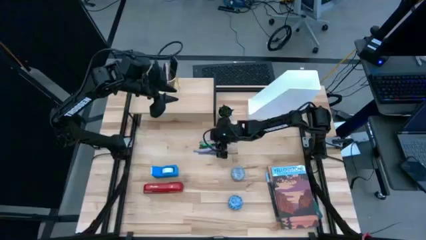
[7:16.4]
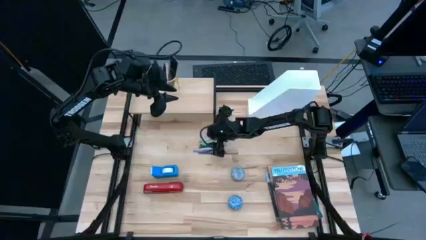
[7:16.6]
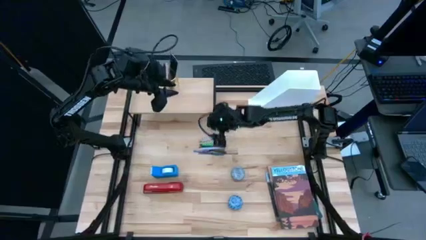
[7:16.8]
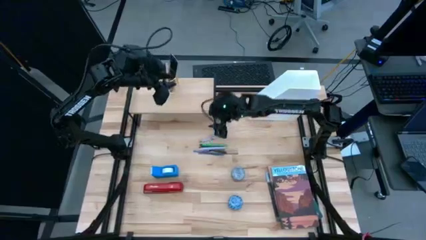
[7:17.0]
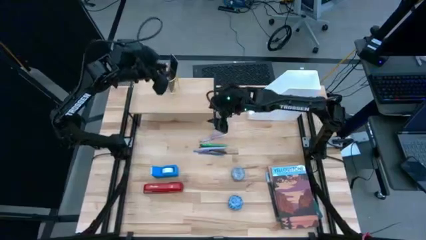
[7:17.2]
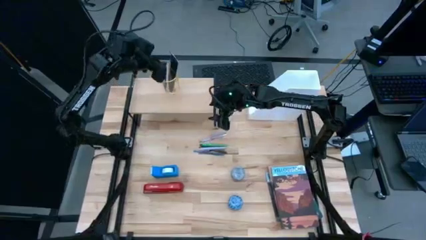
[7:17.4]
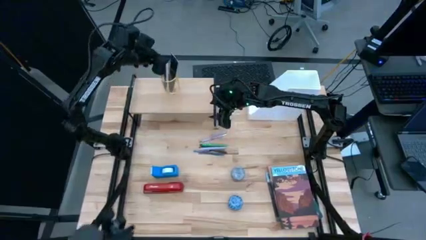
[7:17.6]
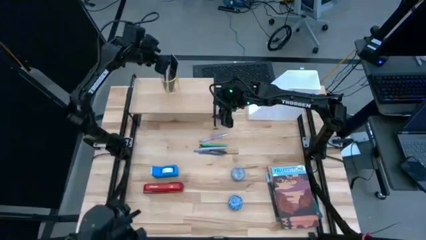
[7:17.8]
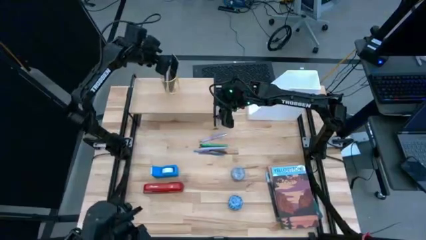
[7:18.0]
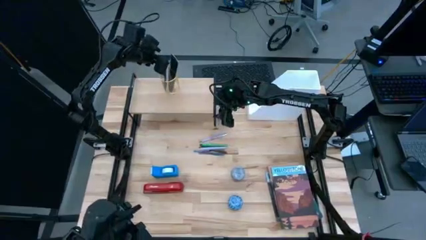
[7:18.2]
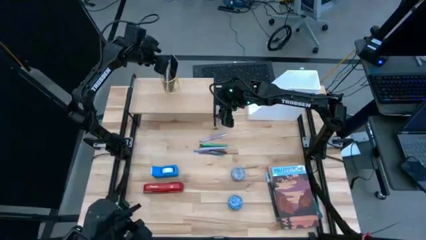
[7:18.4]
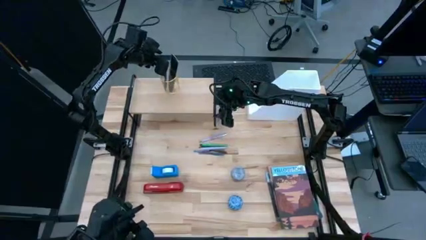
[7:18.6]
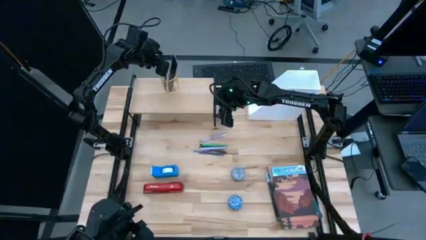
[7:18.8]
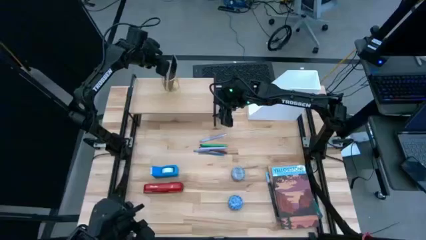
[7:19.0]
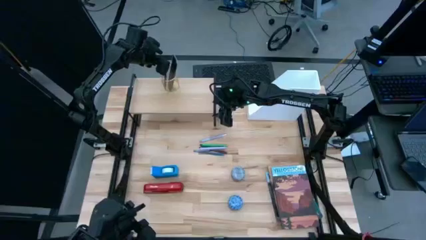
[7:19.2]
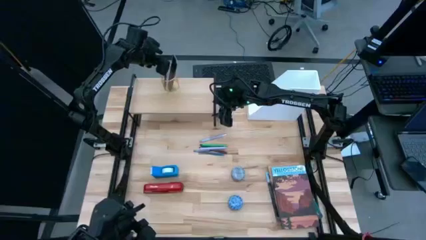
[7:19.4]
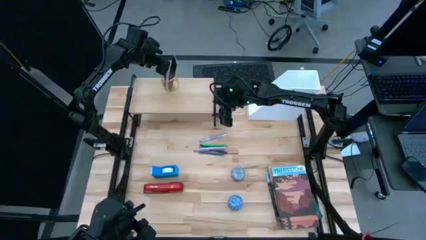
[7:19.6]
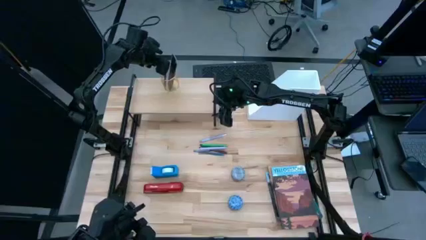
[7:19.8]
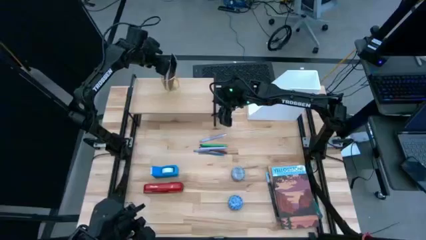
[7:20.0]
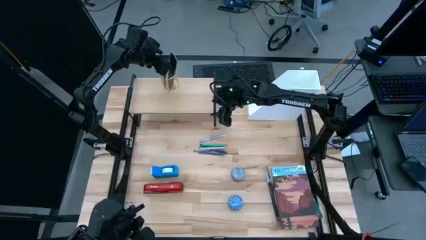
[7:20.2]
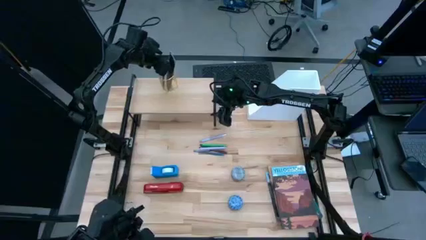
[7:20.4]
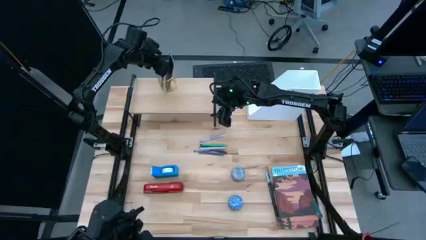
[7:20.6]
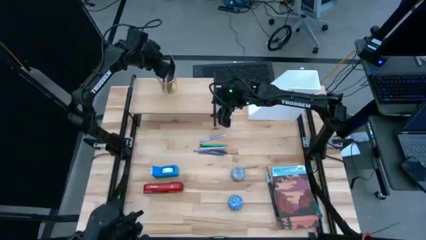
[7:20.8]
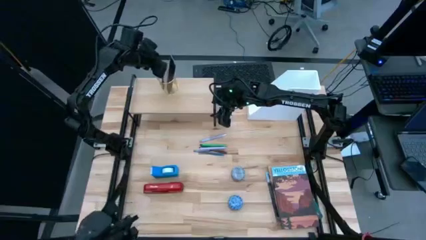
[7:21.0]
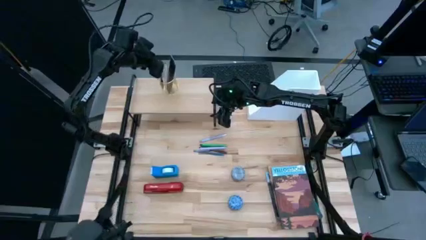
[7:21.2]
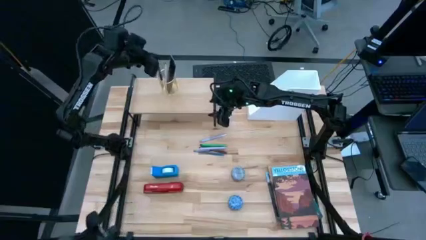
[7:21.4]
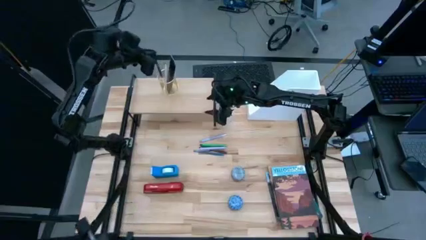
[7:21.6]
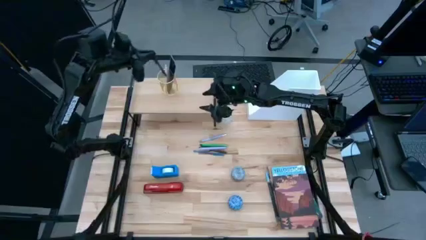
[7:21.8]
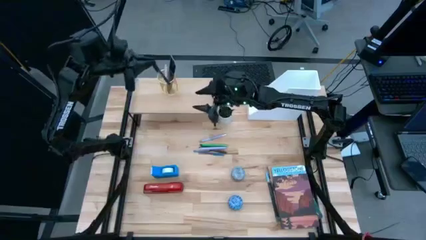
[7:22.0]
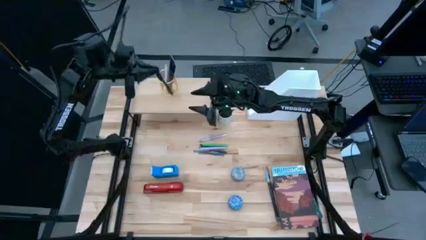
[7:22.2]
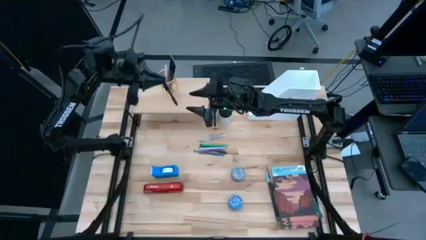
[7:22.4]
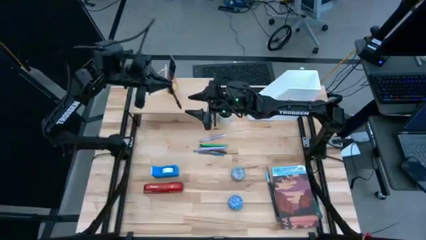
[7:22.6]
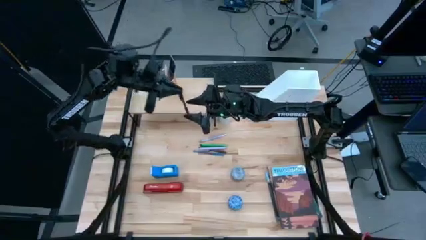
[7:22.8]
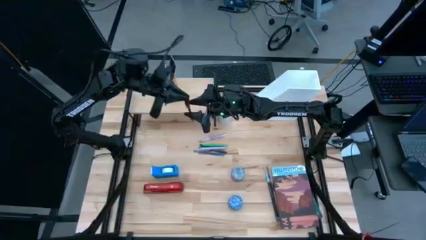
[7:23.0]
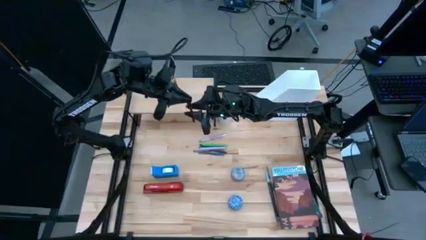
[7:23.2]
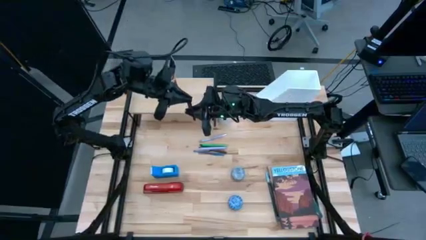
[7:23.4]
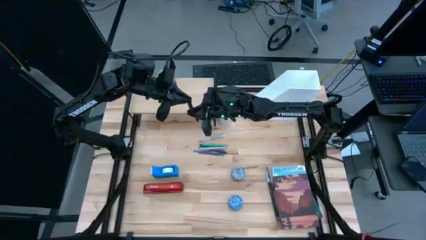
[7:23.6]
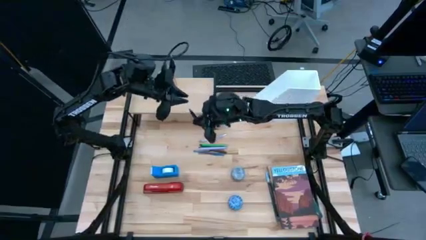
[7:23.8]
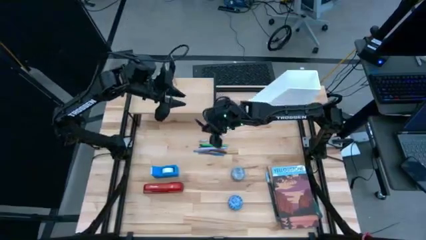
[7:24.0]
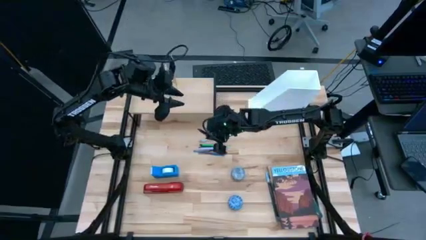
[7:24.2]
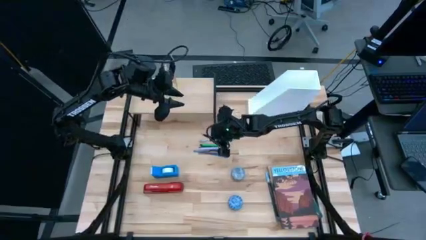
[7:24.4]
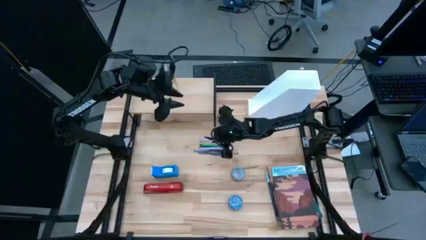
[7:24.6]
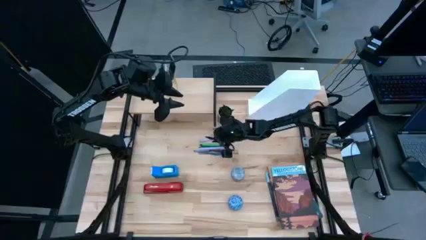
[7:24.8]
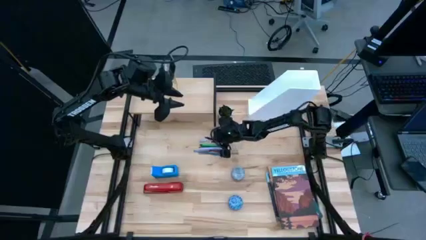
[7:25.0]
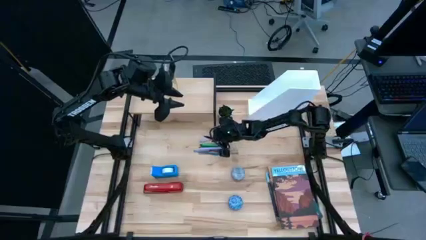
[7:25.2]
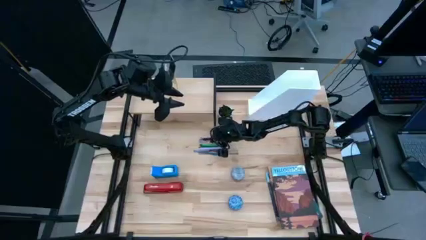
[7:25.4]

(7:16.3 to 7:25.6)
Task: Stock shelves
Remove the purple pen from the gold pen holder

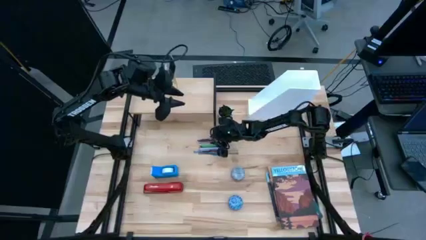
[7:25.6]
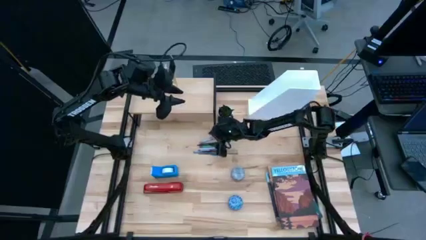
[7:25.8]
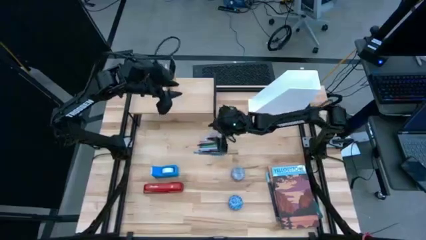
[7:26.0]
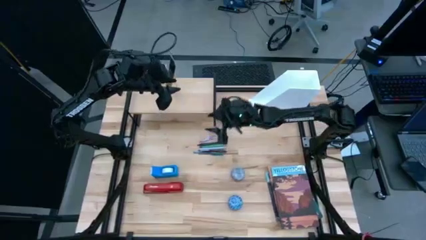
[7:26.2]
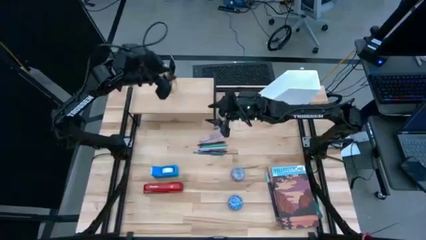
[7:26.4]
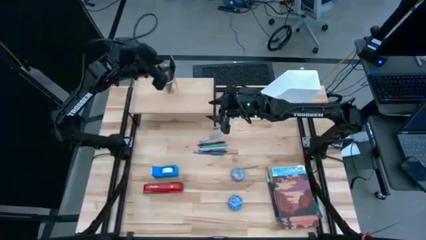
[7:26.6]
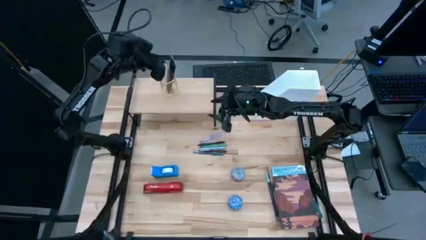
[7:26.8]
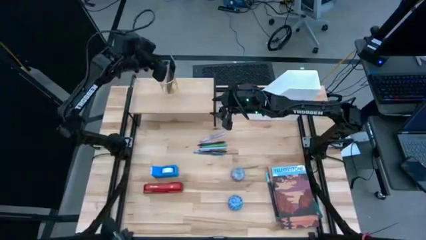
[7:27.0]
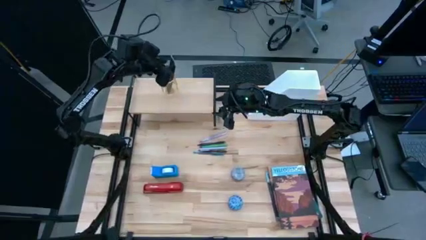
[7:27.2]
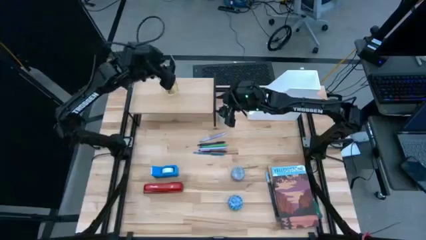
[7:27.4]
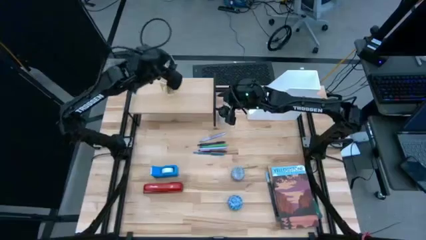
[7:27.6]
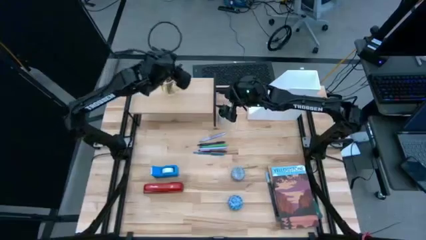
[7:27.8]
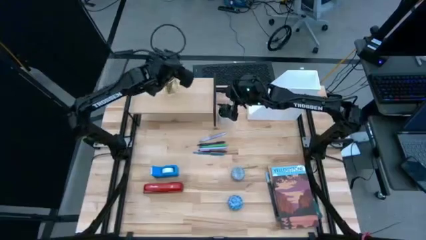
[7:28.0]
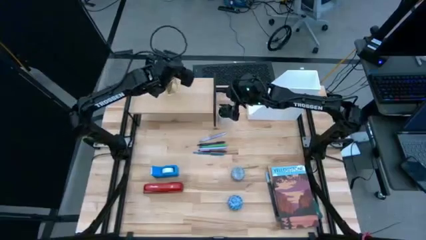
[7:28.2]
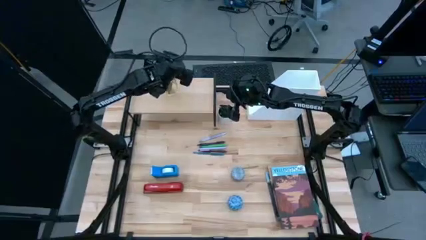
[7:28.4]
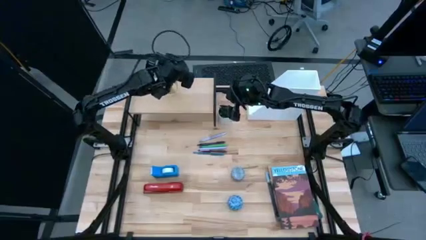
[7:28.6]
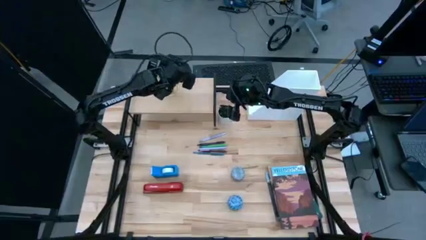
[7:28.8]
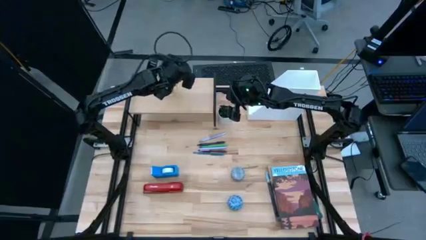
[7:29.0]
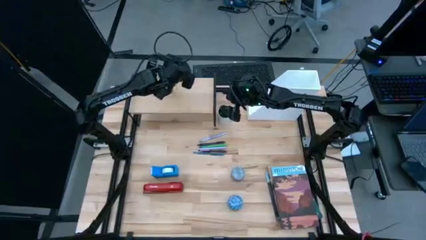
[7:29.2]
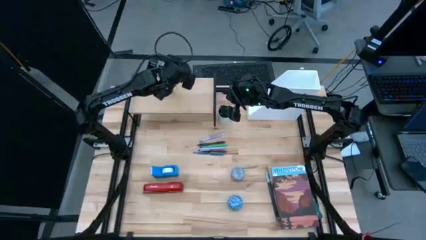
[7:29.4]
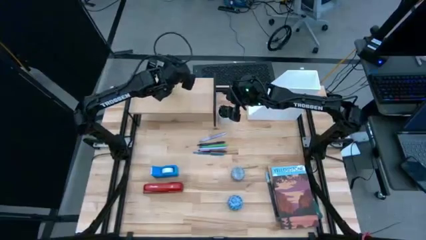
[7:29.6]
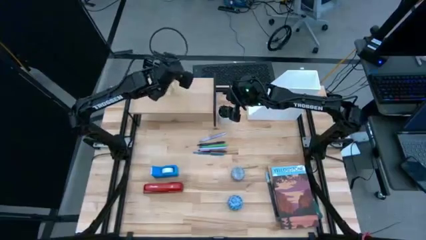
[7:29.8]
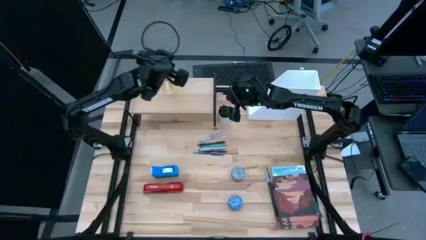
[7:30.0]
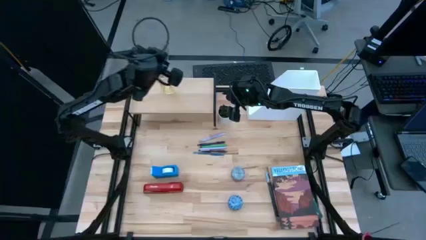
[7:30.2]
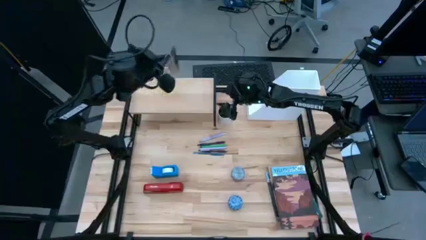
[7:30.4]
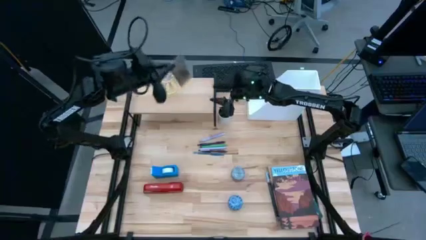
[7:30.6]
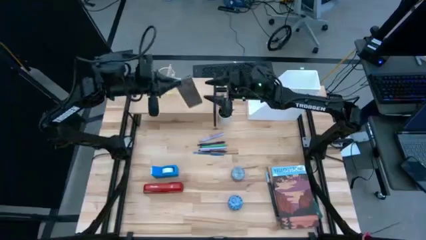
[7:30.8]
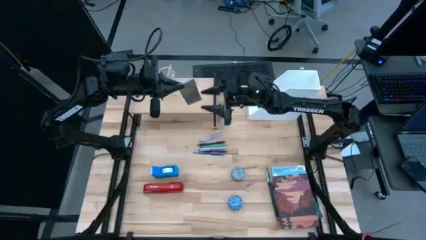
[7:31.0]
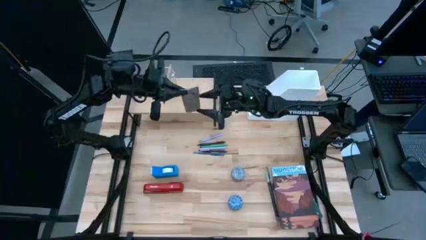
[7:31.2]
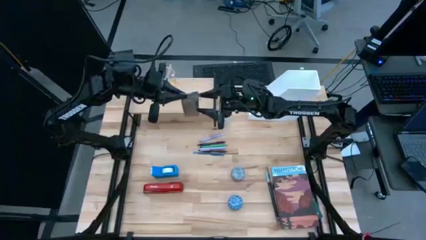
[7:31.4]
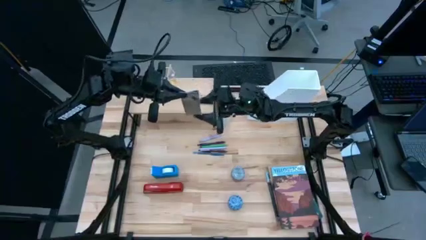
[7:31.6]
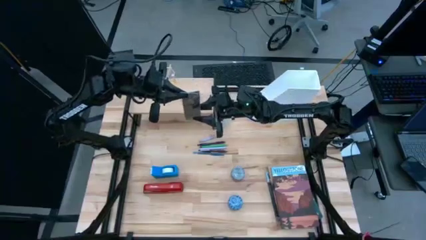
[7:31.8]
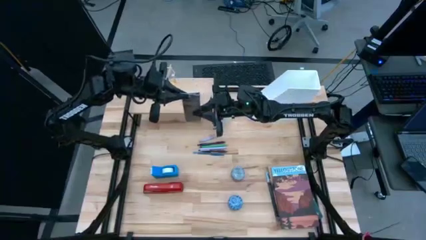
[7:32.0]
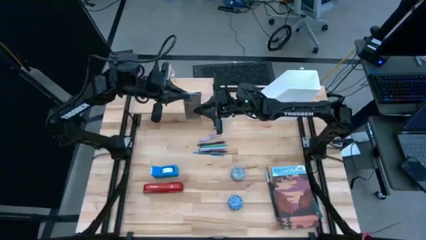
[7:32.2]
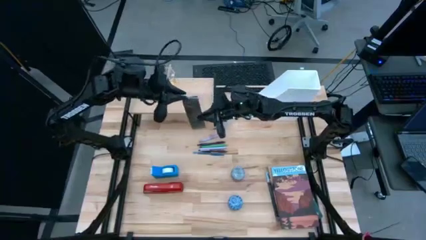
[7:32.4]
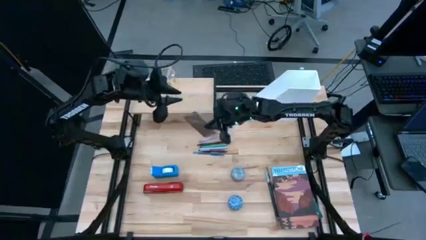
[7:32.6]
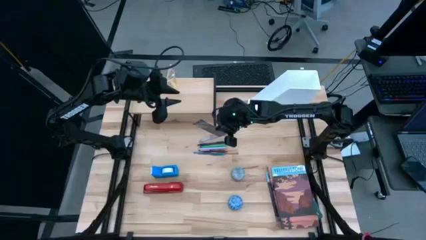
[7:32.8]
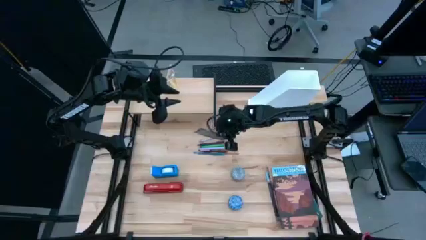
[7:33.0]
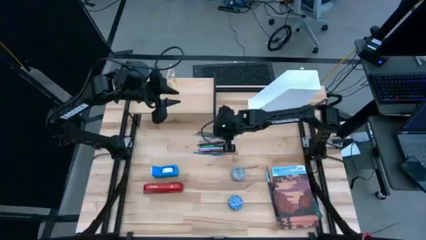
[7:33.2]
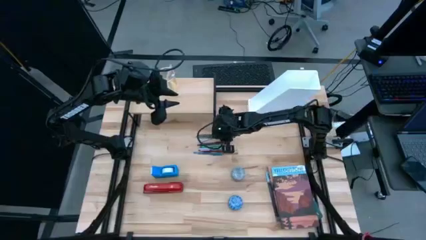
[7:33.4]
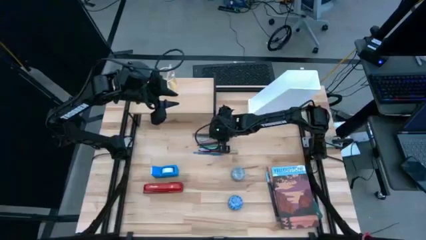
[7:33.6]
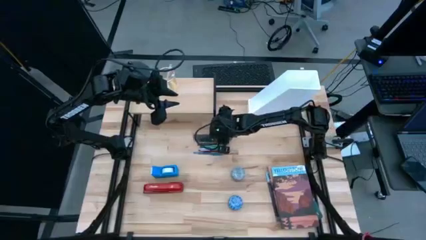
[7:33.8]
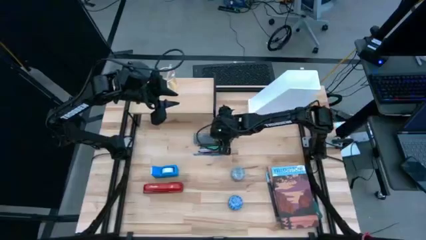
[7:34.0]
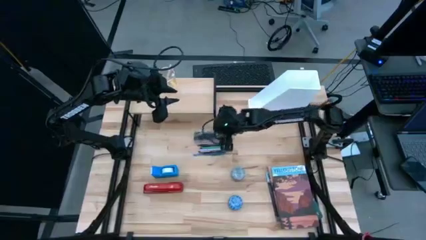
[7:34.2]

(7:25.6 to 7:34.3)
Remove the pack of black pens from the gold pen holder
